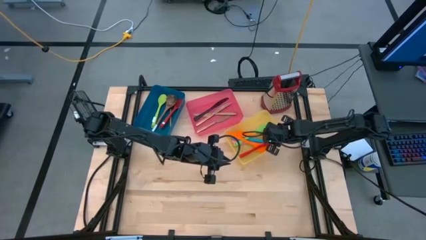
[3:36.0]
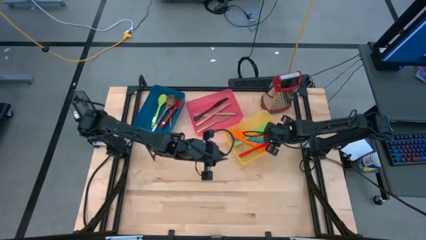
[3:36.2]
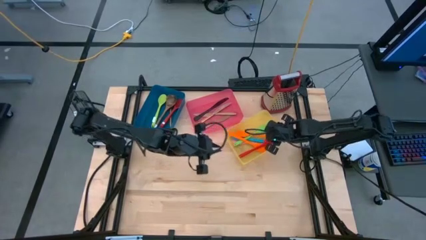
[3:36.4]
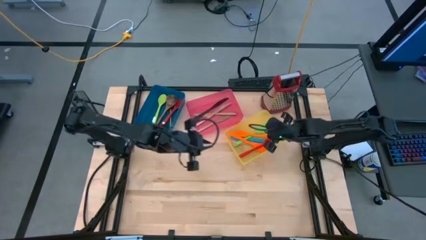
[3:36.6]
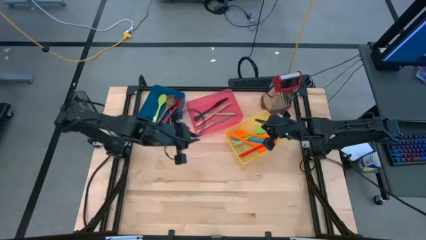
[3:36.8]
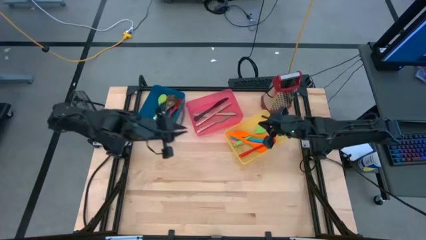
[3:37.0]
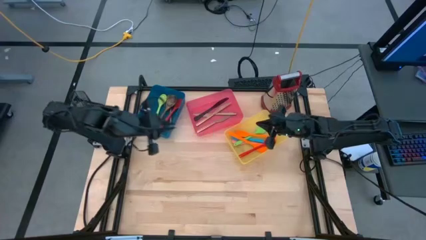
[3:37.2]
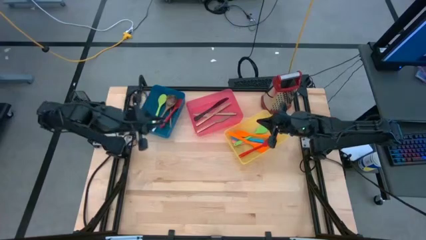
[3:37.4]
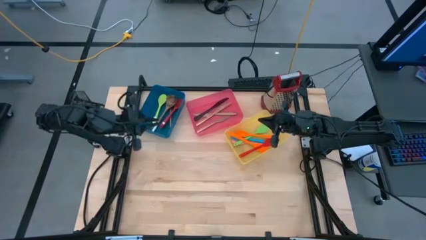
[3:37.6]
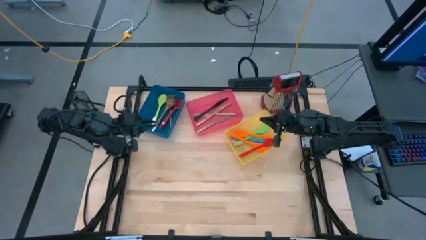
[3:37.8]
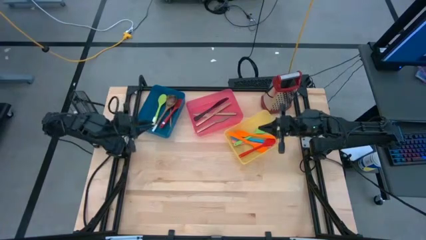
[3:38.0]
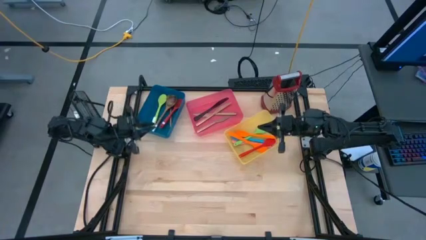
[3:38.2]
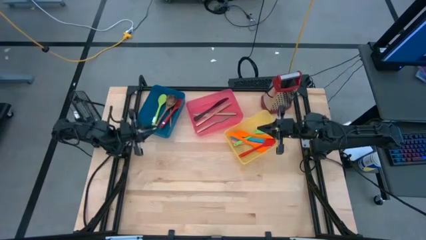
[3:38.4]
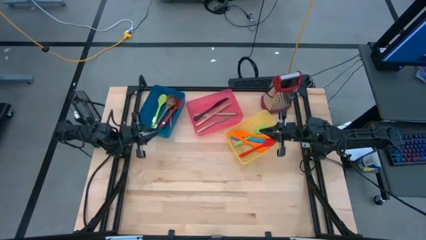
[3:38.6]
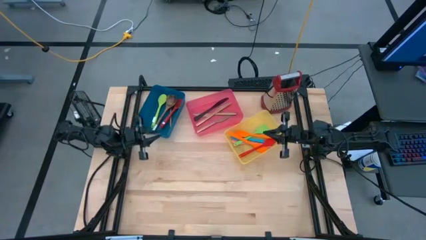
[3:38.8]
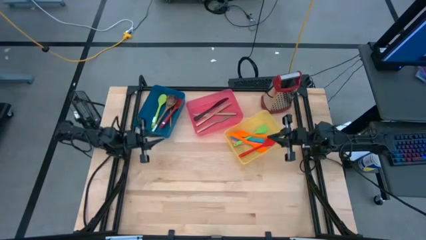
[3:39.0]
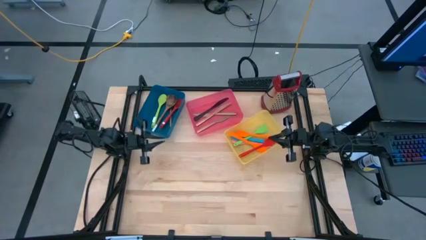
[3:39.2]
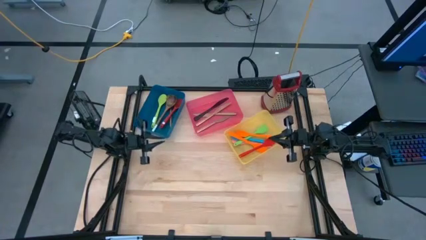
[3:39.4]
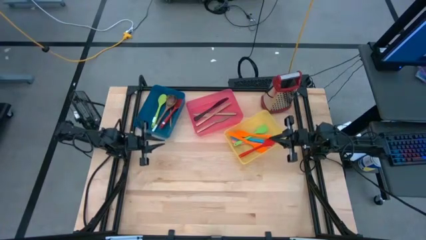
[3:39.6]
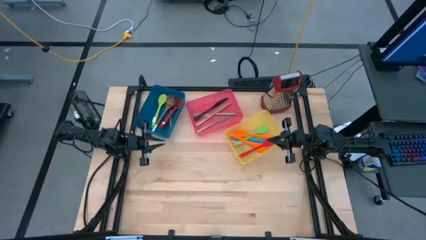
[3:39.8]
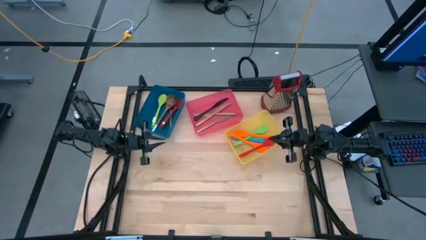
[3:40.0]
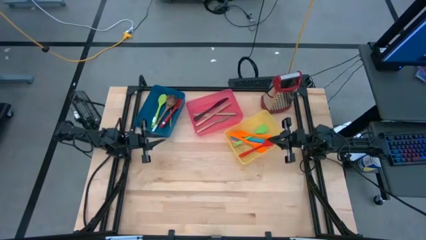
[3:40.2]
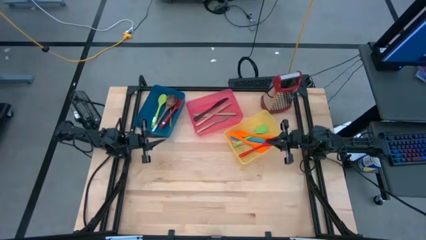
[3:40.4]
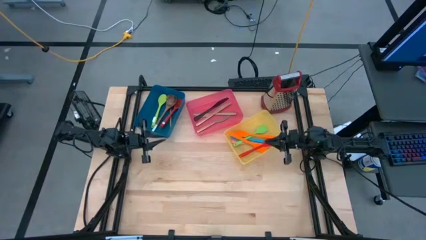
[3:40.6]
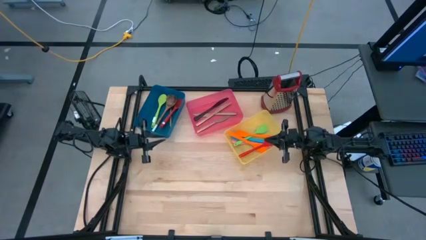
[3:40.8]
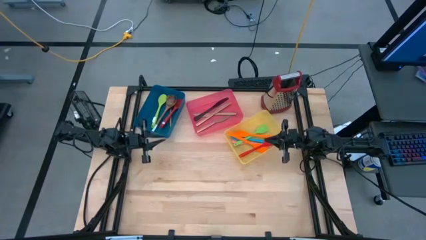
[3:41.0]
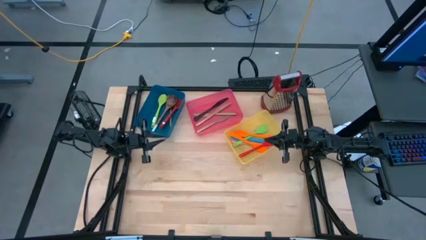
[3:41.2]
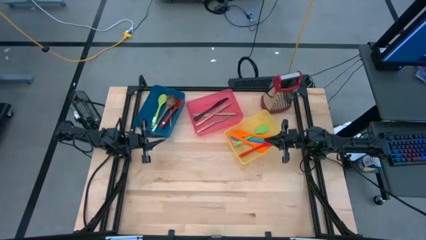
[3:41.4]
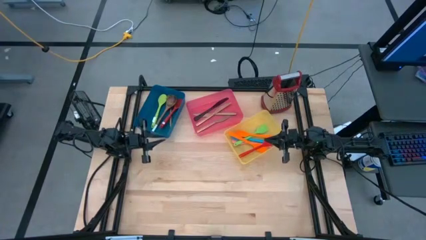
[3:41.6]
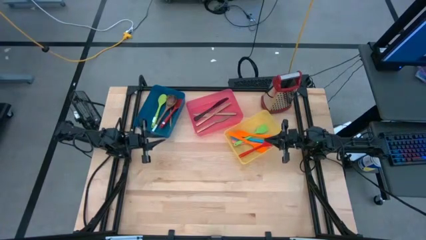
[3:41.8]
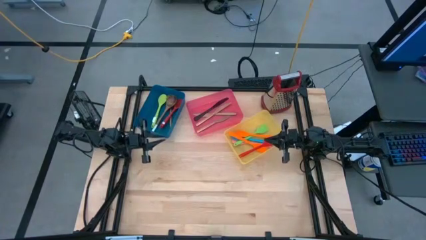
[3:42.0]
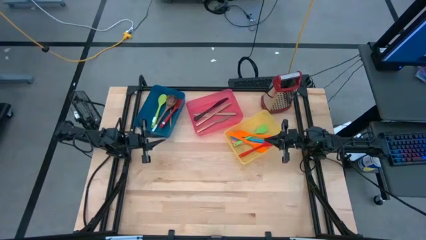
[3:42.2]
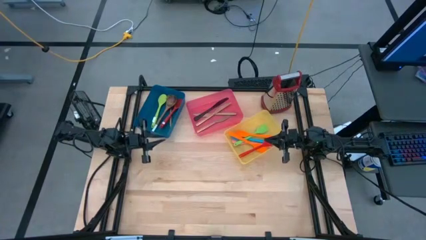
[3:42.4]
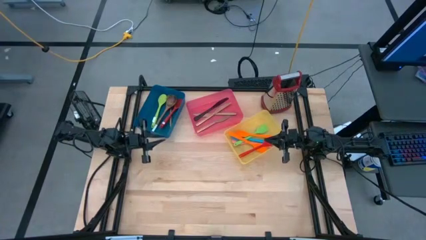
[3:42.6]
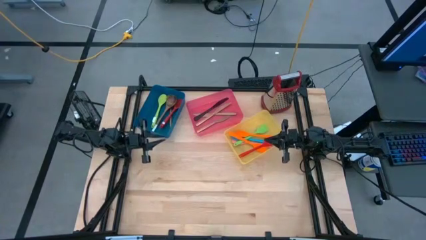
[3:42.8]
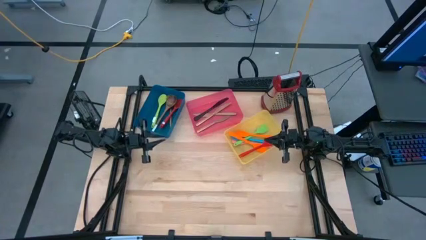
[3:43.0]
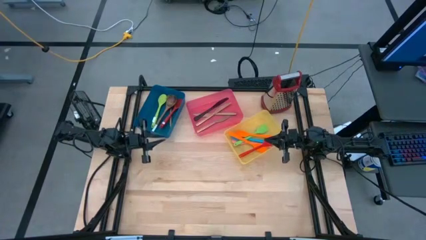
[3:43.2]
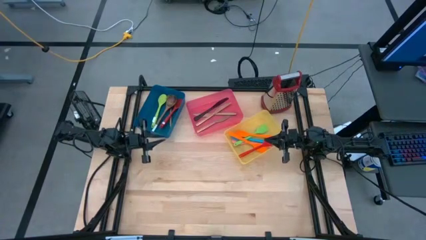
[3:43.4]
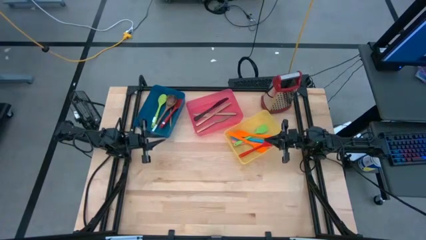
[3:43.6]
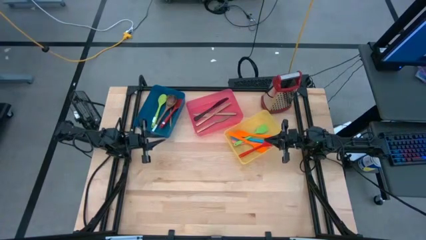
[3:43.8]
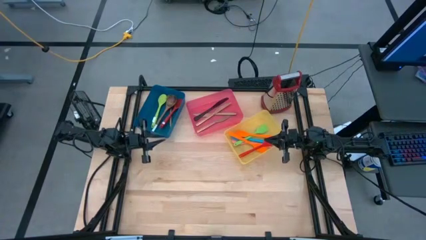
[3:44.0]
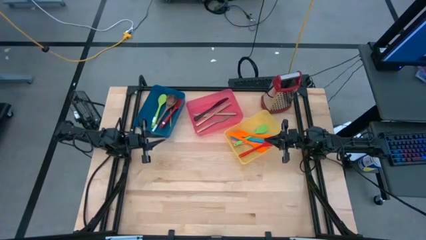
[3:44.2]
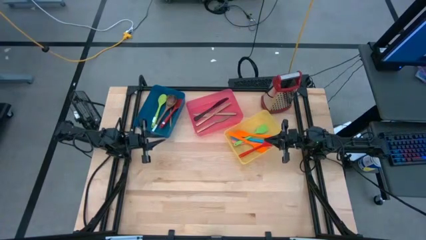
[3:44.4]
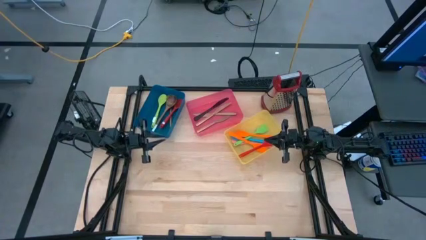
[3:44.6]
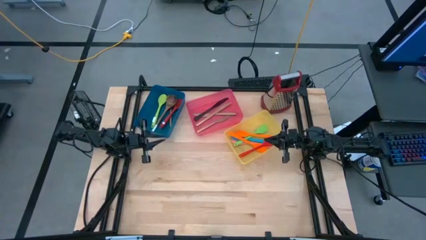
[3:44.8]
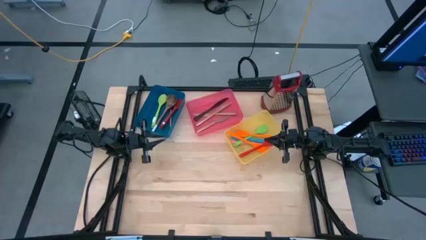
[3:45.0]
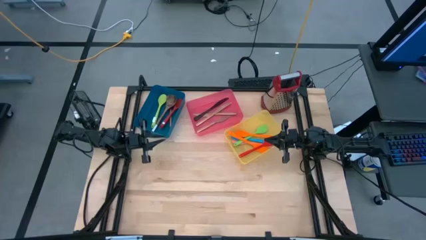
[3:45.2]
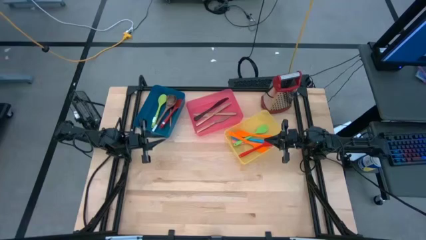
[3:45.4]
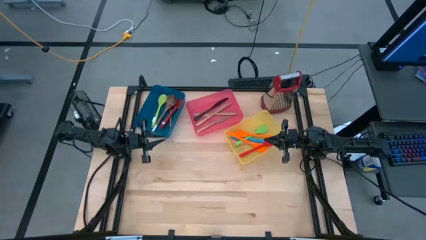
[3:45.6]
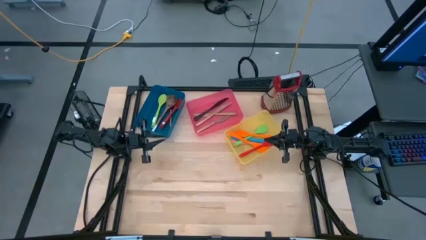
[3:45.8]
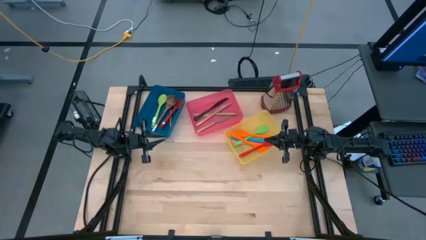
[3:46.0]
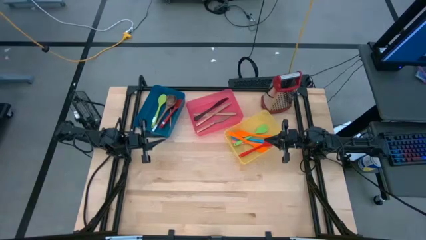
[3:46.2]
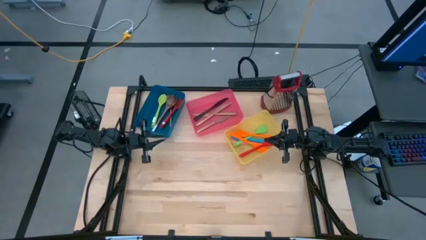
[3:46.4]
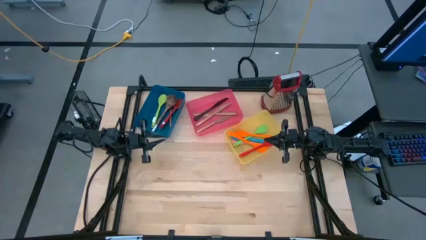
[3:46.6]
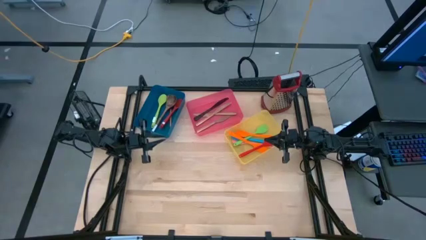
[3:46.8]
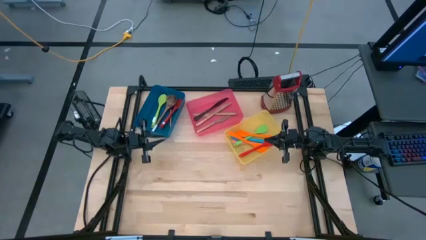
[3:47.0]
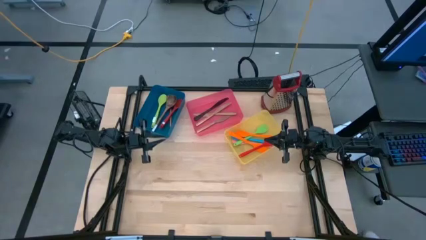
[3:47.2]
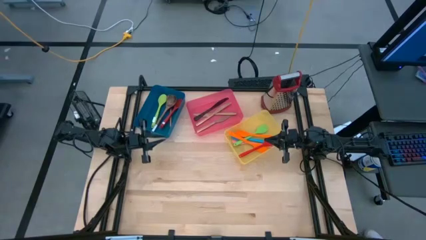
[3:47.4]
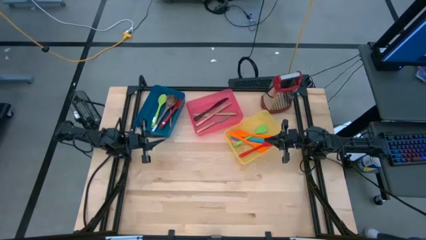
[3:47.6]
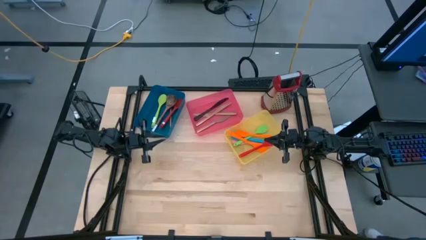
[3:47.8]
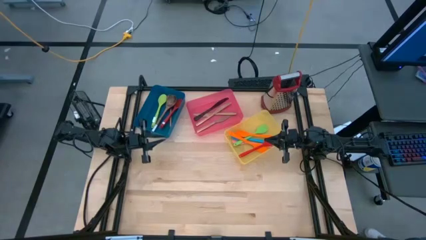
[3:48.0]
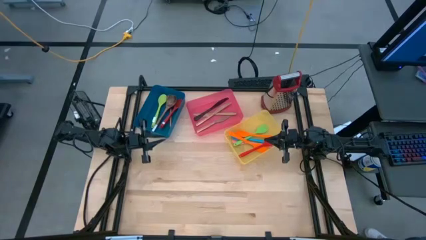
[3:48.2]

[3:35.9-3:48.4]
Task: Pick & Place Kitchen Items
Return to Home Position

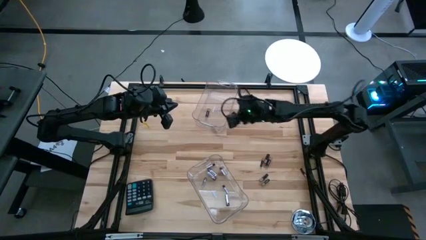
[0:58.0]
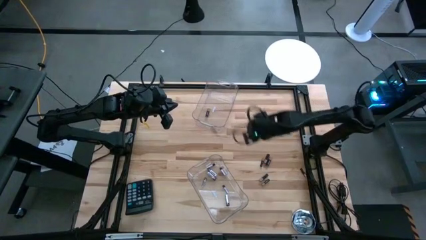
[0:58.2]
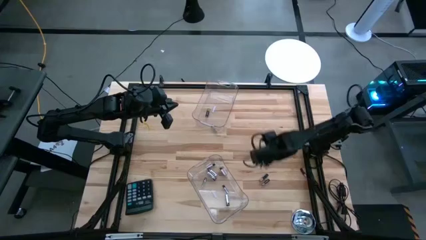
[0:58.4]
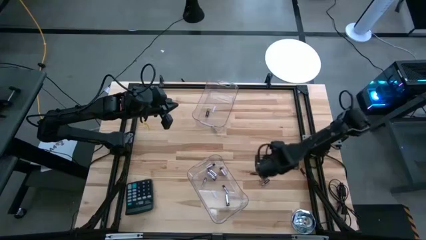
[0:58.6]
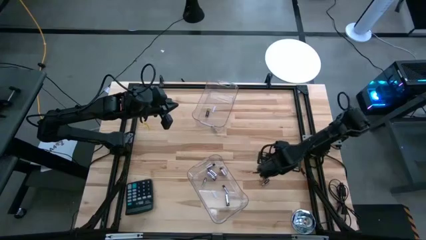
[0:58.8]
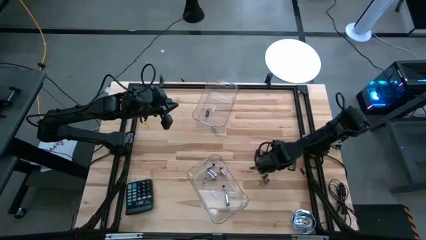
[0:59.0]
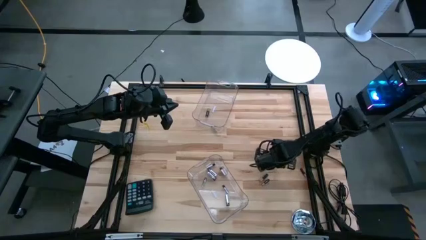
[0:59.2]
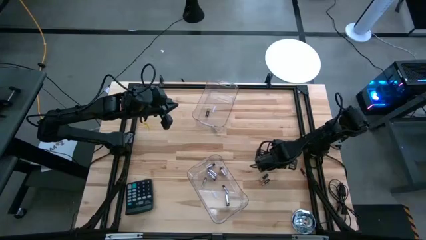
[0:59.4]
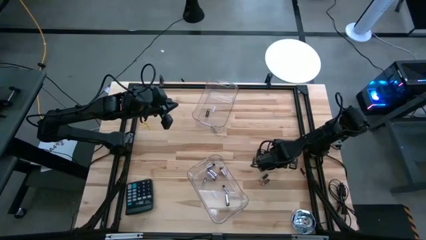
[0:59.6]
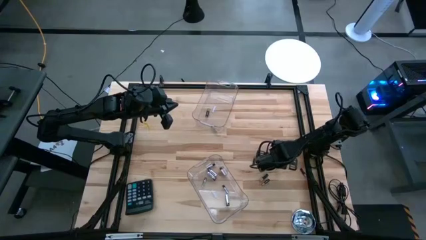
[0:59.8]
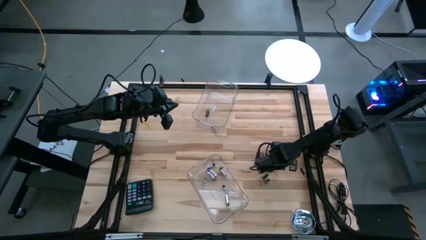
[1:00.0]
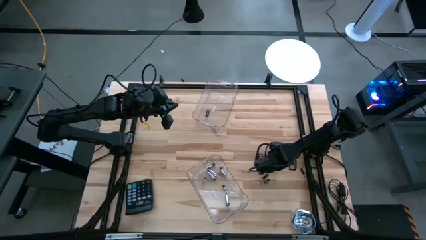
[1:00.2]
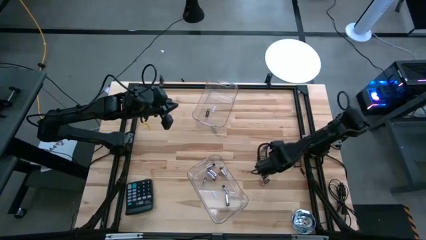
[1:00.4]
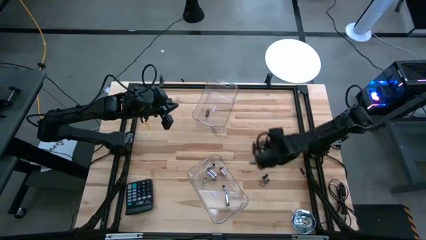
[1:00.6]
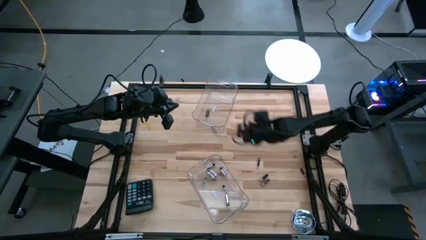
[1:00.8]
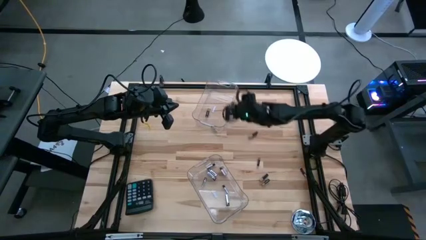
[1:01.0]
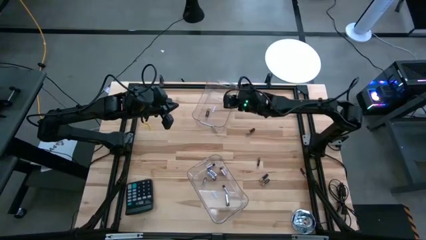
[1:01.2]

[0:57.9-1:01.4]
Task: Sort batteries
Put the black battery into the top transparent bin

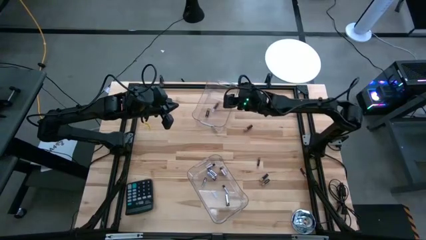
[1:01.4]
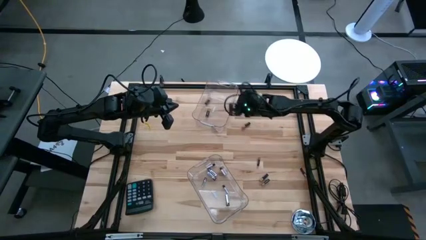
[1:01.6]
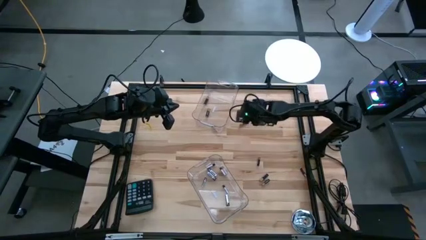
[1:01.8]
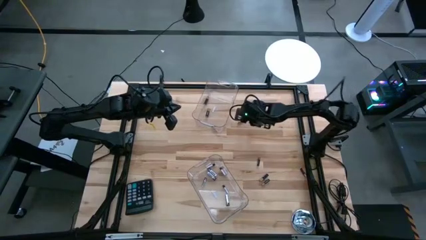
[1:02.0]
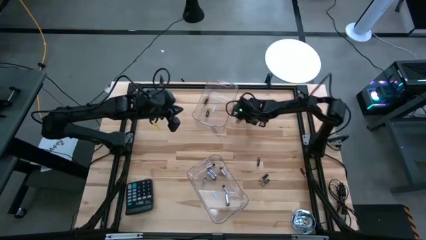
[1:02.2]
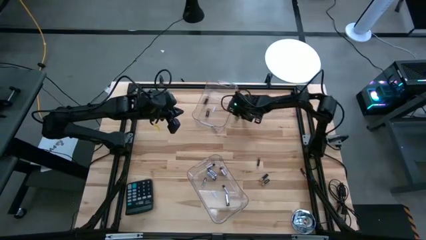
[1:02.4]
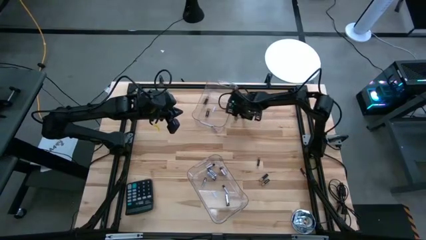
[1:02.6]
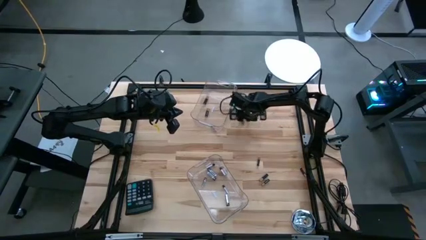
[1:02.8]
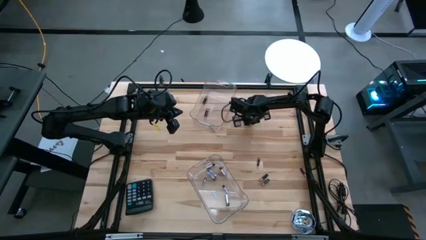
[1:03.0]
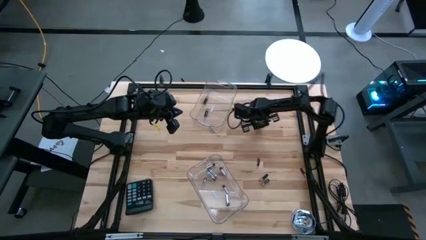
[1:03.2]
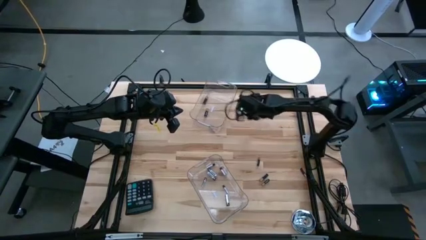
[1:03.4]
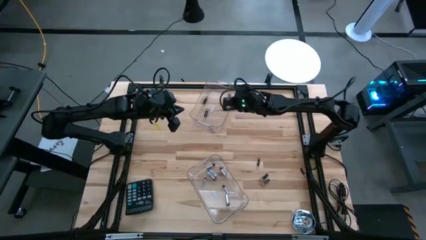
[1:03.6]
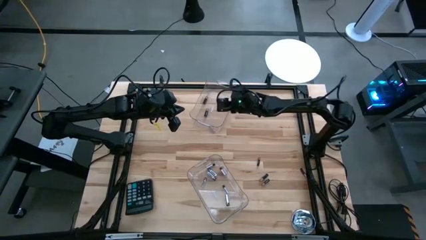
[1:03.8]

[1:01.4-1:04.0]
Put the black battery into the top transparent bin
